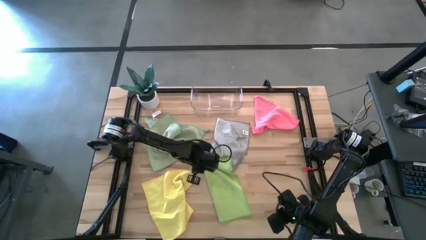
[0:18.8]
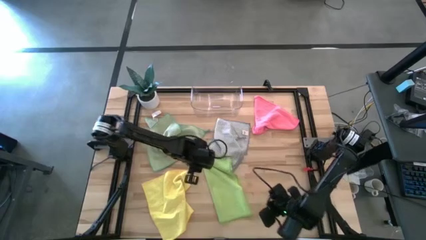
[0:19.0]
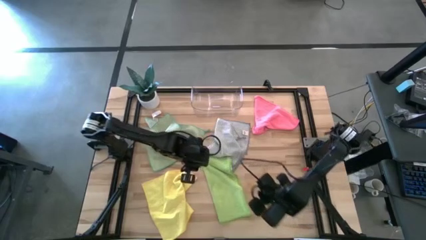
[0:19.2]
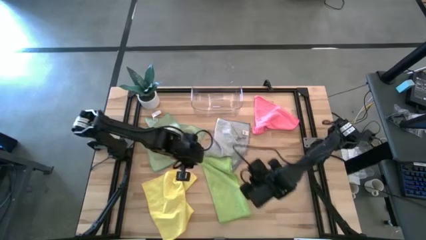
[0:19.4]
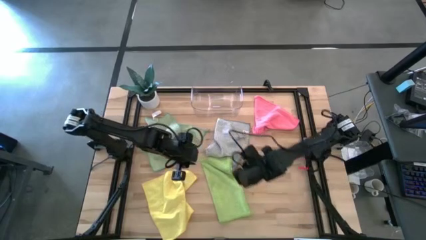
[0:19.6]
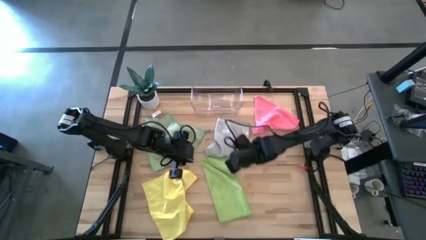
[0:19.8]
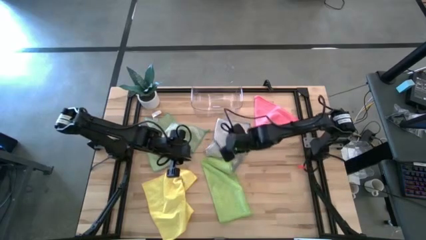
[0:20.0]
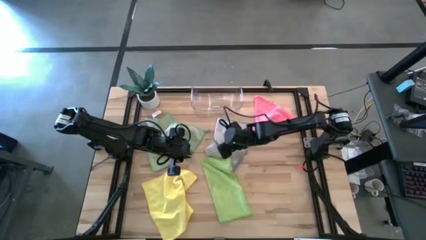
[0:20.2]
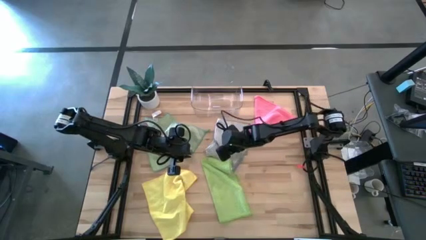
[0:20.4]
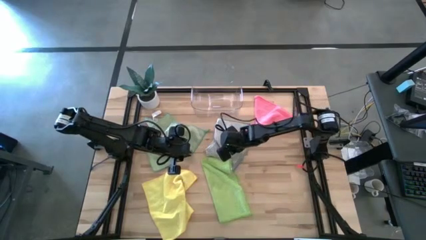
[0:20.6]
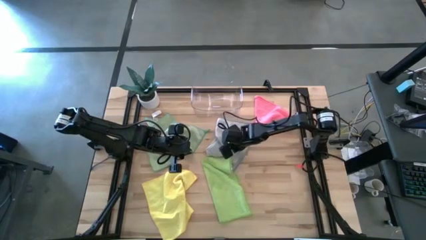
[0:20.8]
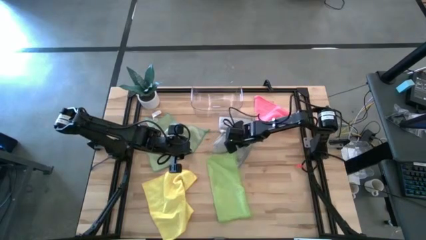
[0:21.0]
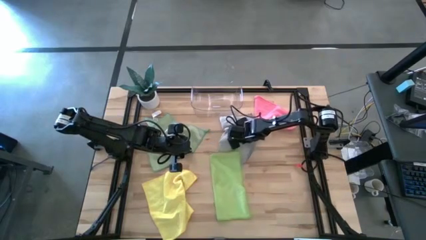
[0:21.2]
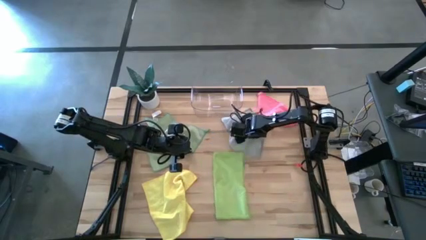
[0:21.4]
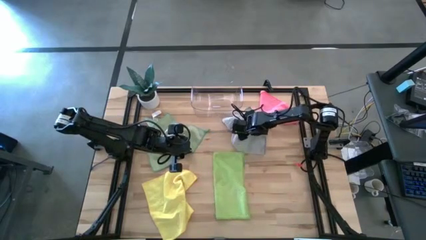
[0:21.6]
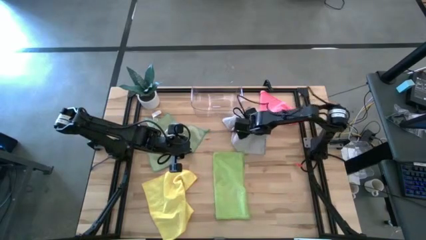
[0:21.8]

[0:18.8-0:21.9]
Task: Fold microfiber towels
Adjust the gray microfiber cloth

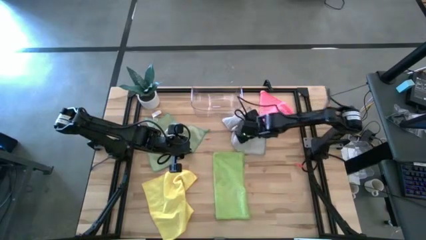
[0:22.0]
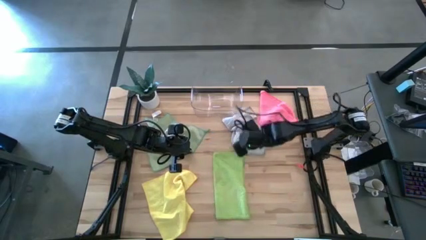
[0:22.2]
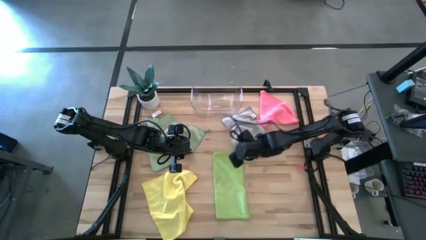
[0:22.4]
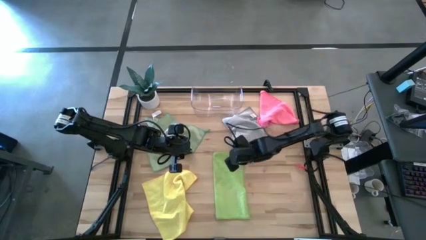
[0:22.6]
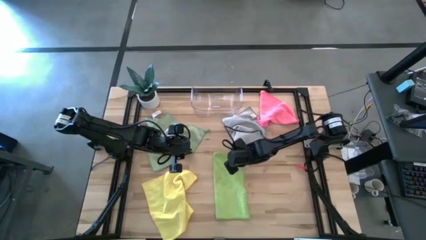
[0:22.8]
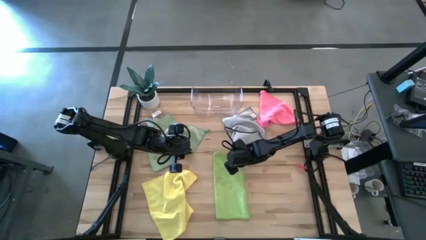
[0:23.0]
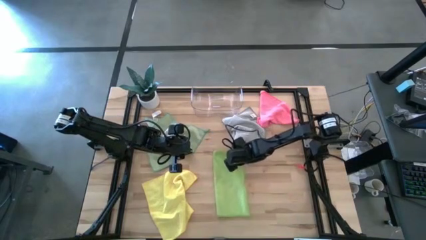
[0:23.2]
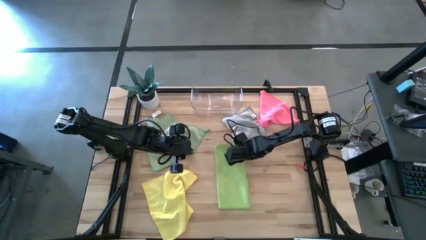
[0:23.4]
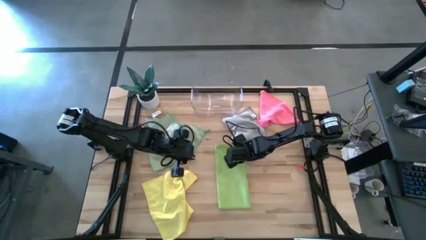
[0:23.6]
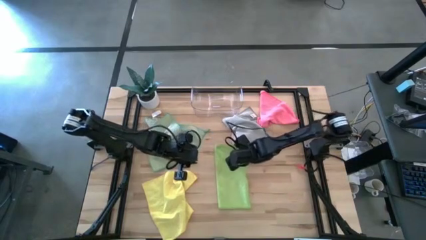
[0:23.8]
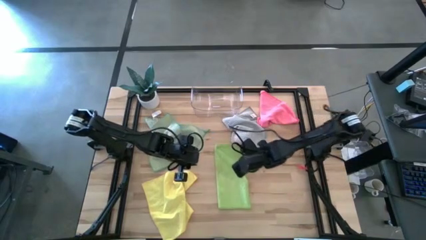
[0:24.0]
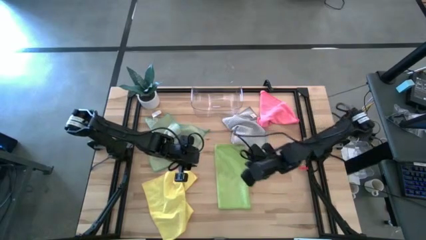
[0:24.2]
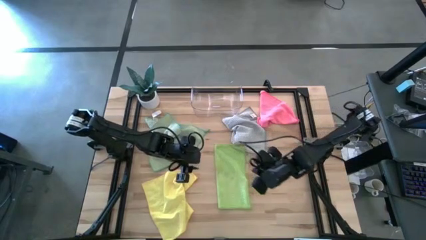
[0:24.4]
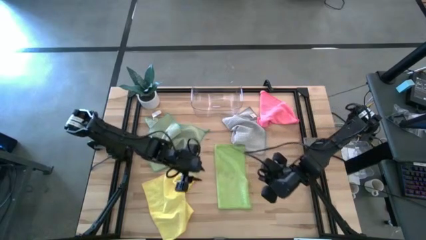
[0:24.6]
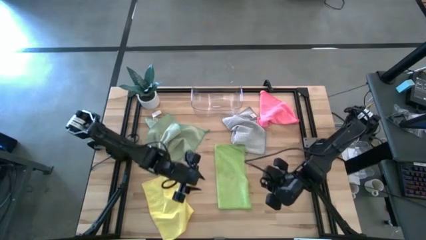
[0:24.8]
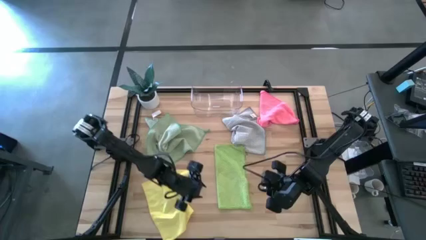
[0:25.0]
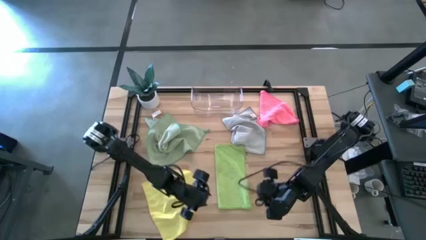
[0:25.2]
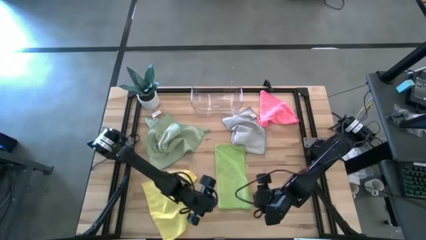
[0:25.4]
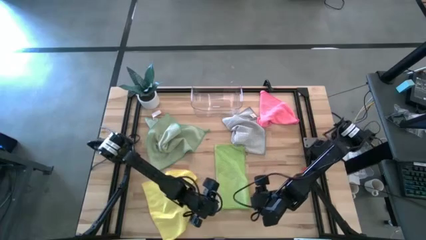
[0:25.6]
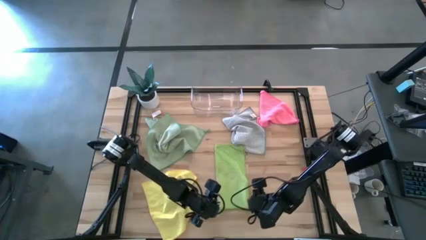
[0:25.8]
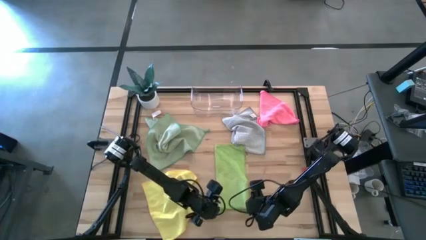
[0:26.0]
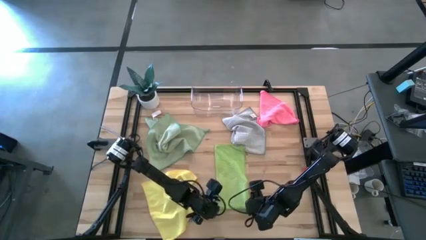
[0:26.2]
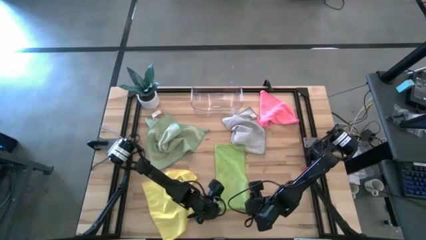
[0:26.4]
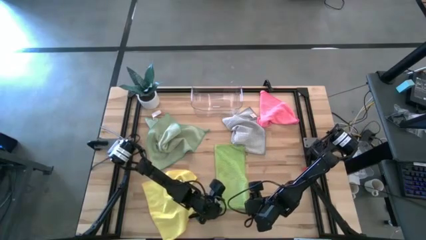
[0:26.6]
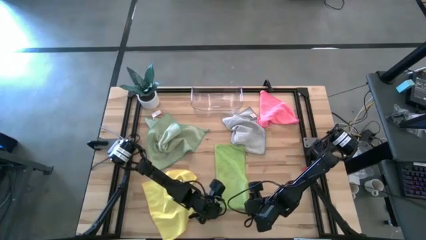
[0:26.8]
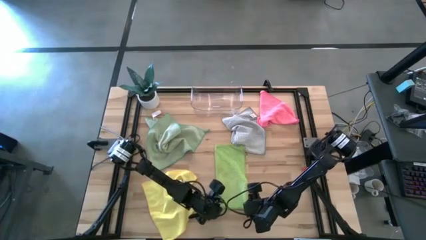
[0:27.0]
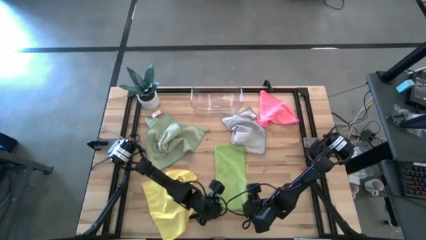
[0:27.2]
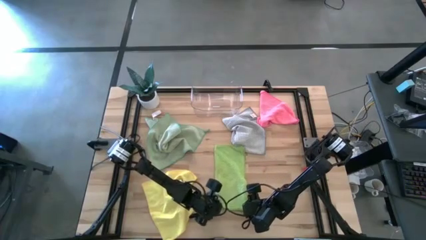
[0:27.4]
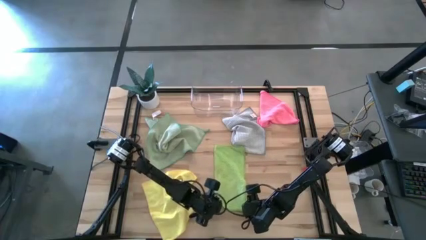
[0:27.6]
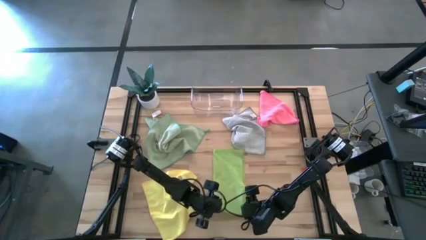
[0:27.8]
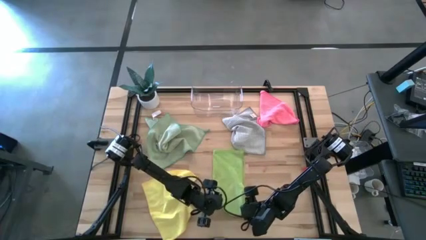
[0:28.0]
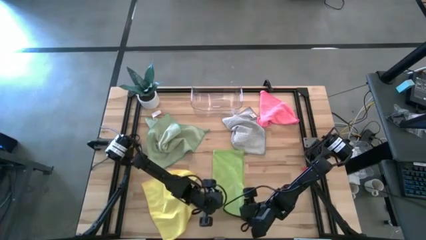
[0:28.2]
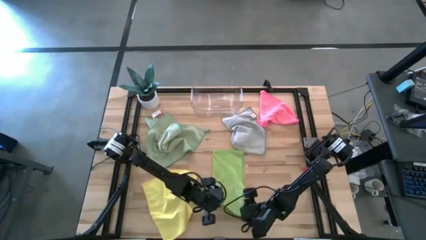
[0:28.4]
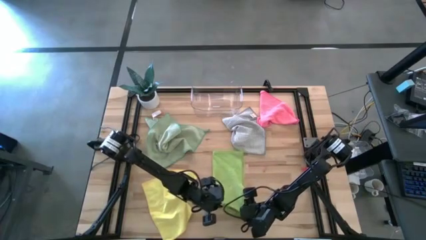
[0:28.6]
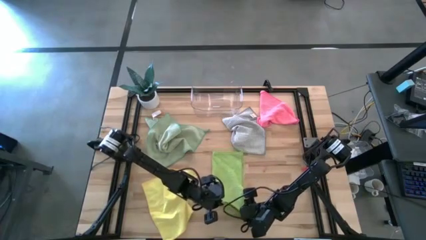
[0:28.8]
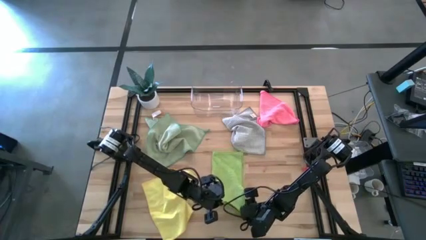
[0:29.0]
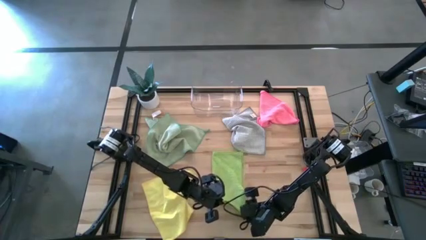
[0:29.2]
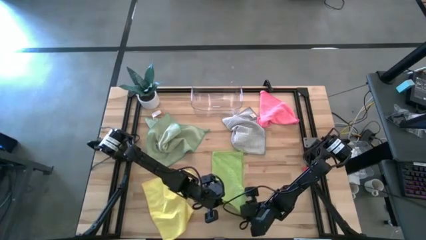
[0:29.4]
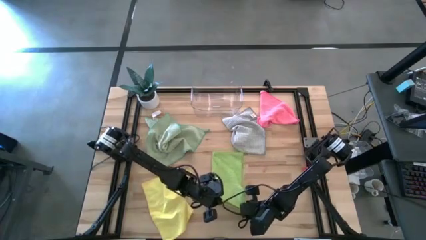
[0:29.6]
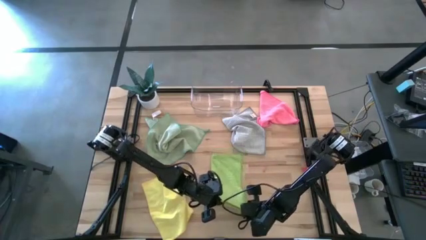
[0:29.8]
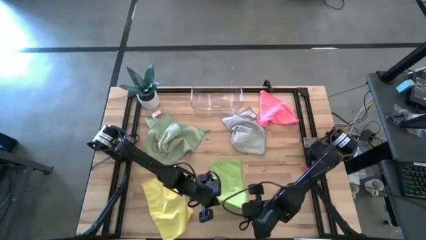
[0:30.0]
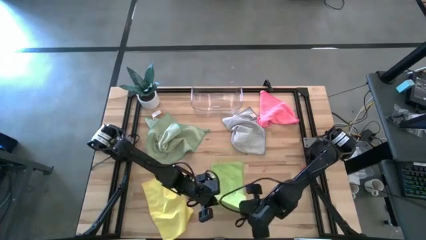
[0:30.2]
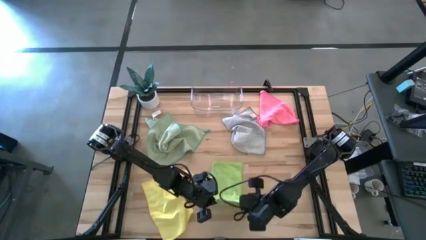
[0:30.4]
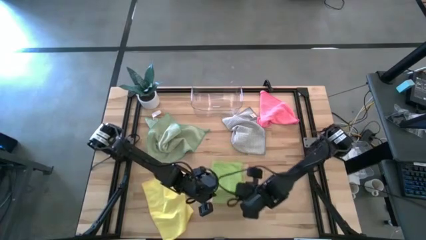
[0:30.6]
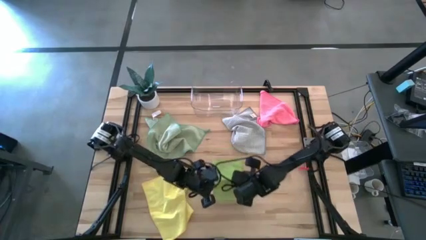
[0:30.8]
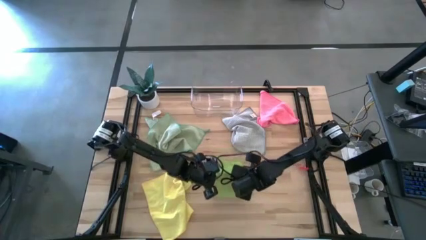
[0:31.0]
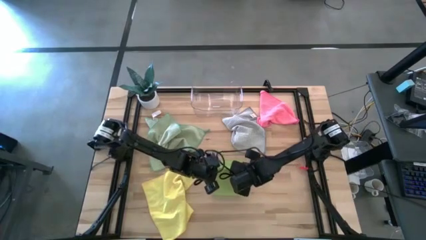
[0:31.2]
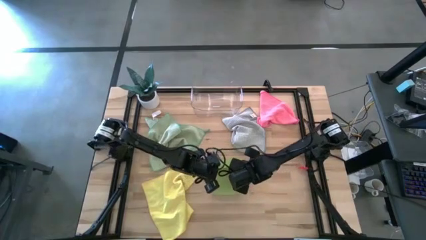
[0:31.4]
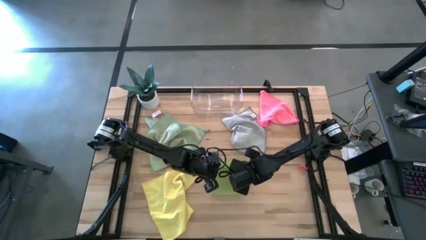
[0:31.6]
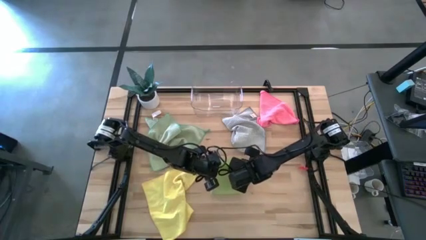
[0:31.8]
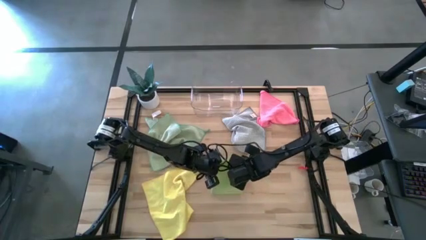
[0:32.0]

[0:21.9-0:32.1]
Fold the green microfiber cloth

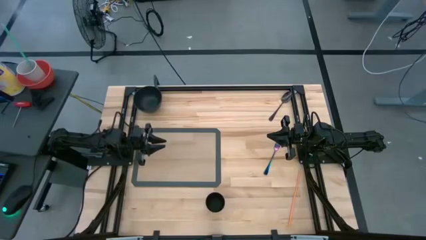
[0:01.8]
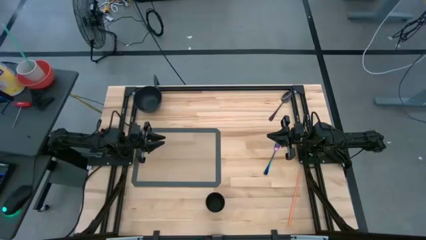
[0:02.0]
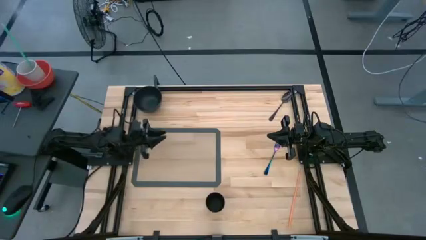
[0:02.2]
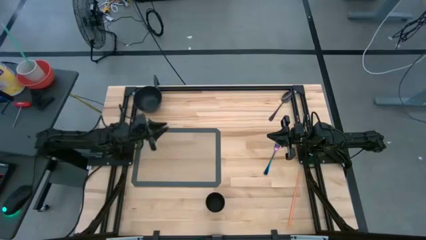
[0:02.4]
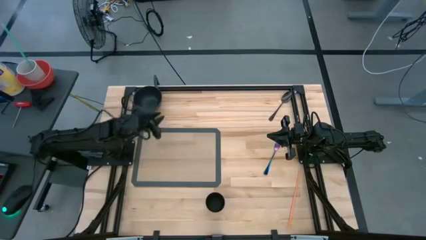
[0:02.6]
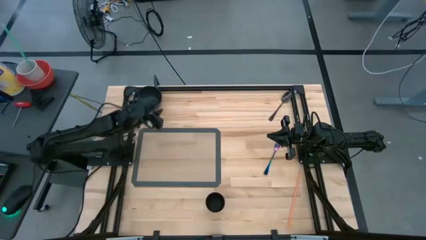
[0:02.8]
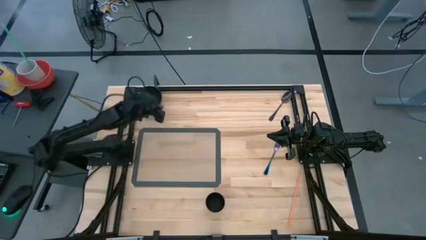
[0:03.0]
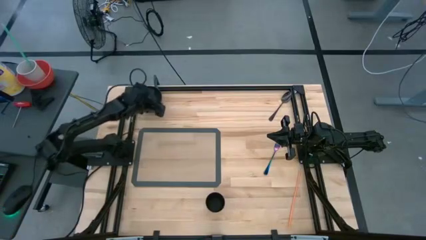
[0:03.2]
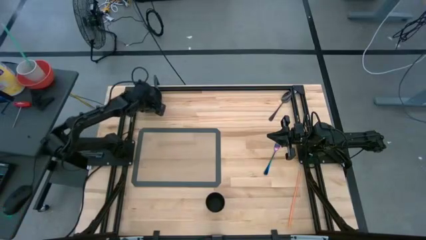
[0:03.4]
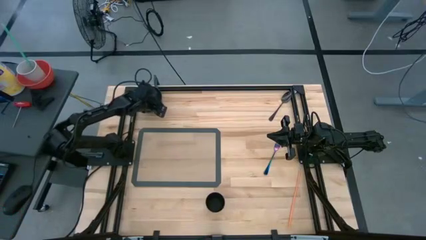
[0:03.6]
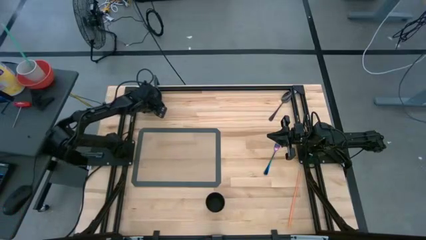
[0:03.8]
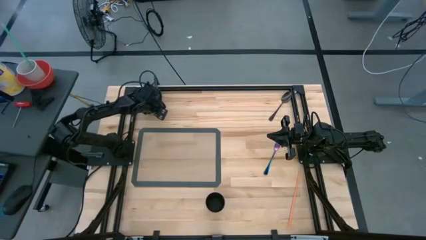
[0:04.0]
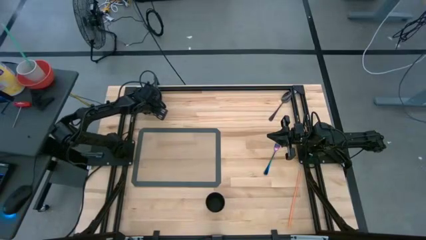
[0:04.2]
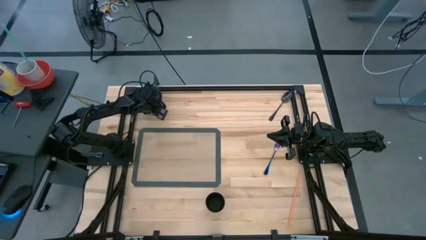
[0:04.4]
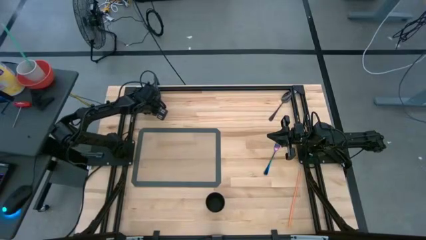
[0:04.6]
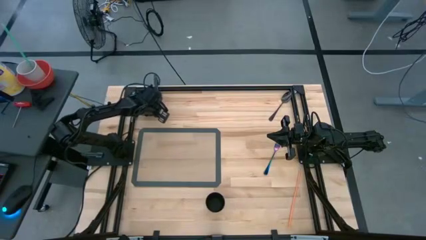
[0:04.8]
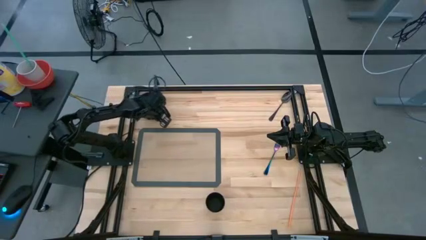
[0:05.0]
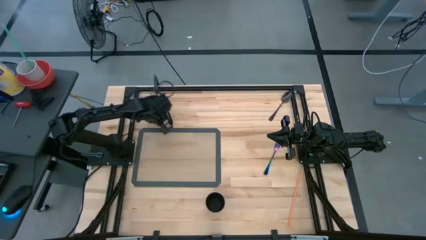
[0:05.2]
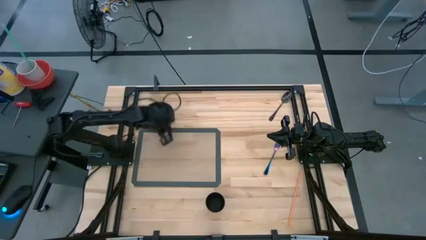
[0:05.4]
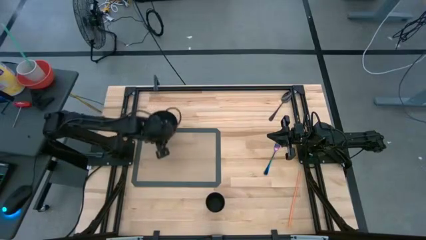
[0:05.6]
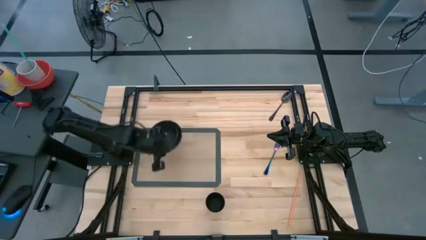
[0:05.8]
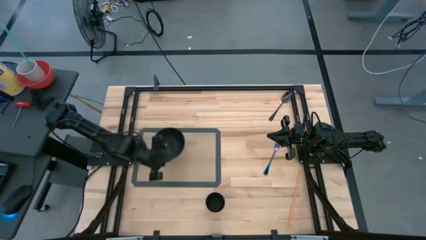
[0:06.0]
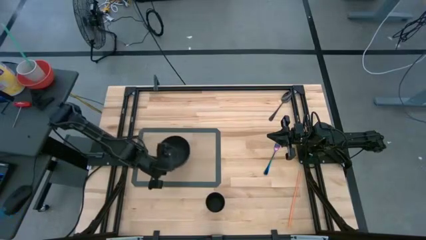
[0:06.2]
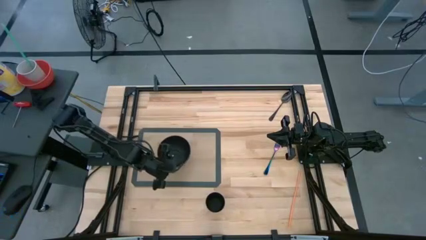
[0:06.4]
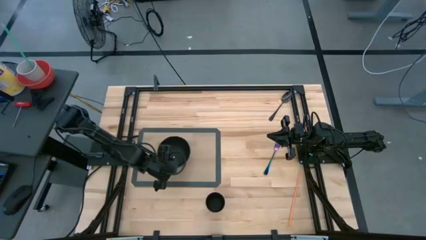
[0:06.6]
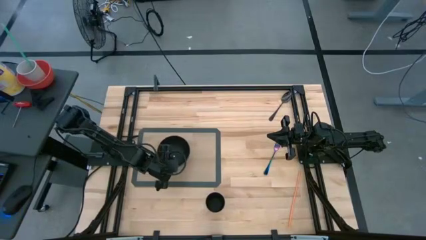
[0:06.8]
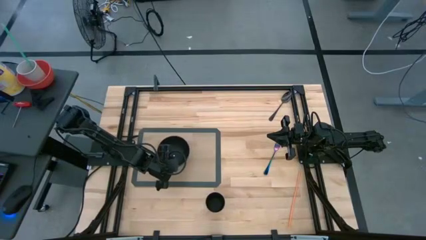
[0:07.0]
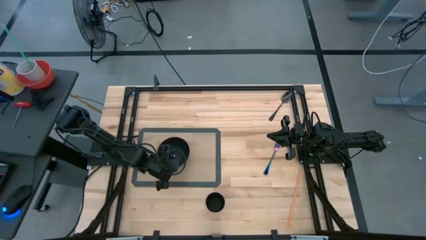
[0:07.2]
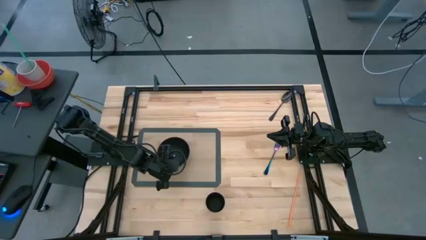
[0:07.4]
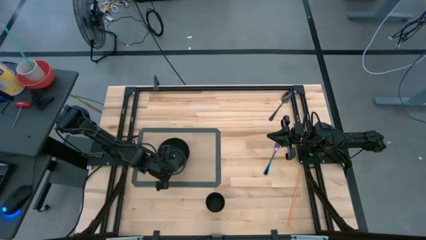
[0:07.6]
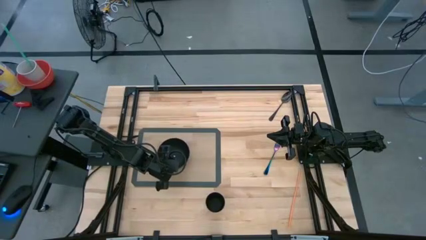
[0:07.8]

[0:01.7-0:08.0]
Task: Pick & Place Utensil
Put the black bowl on the center of the gray placemat
